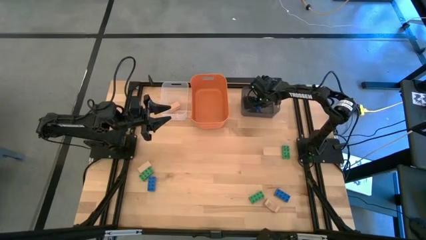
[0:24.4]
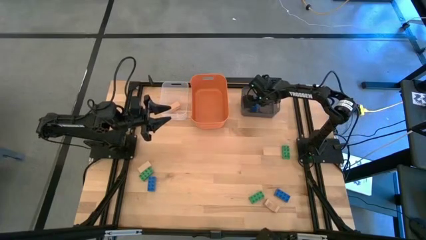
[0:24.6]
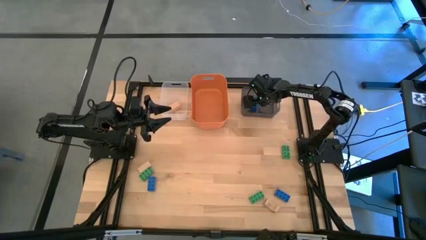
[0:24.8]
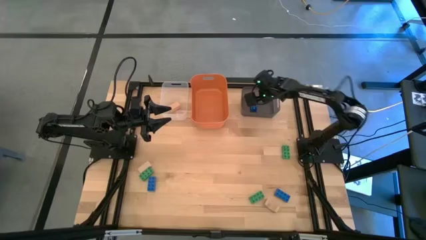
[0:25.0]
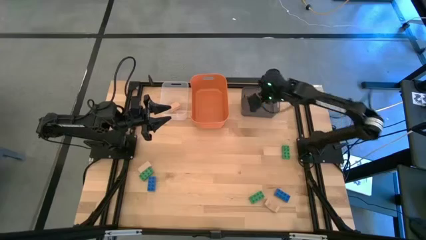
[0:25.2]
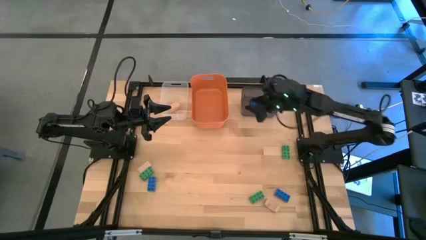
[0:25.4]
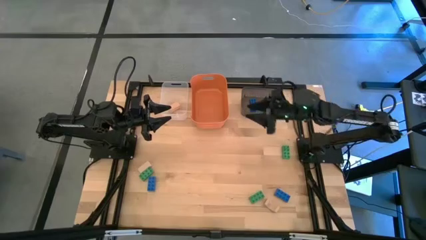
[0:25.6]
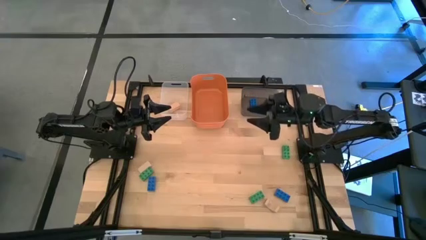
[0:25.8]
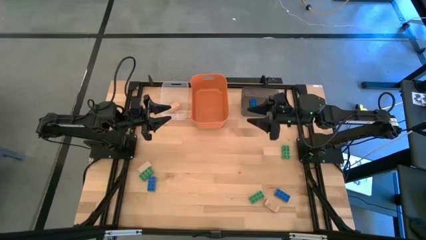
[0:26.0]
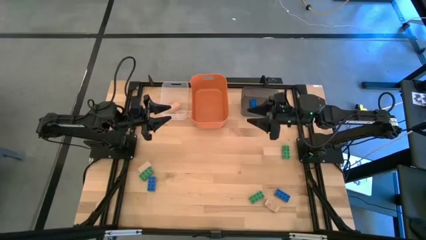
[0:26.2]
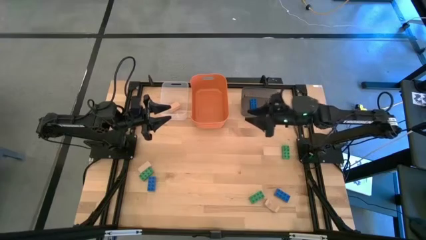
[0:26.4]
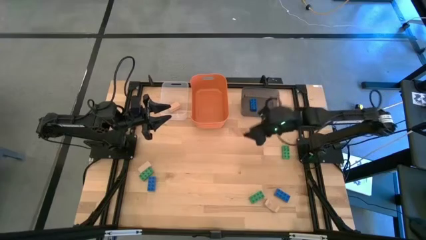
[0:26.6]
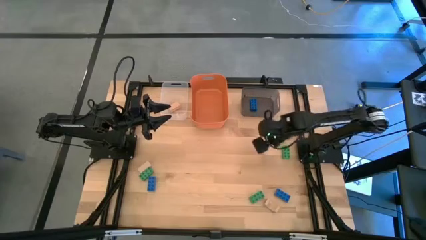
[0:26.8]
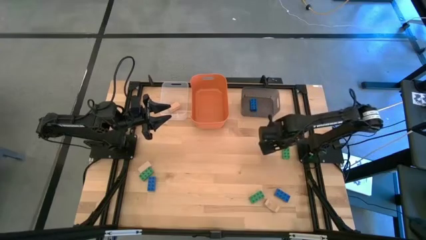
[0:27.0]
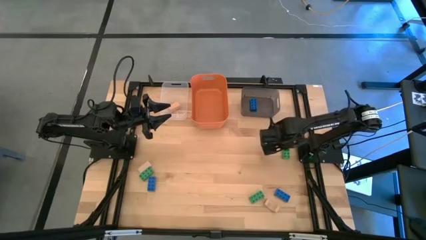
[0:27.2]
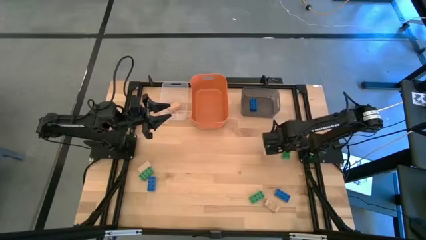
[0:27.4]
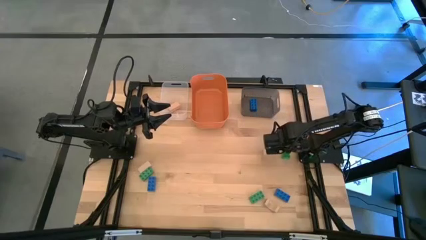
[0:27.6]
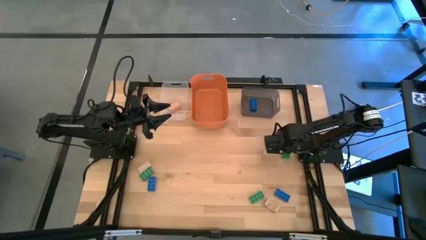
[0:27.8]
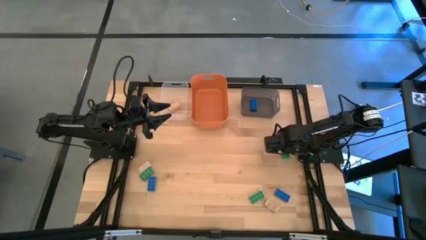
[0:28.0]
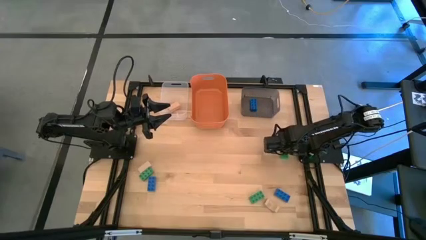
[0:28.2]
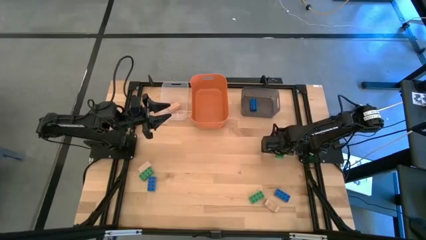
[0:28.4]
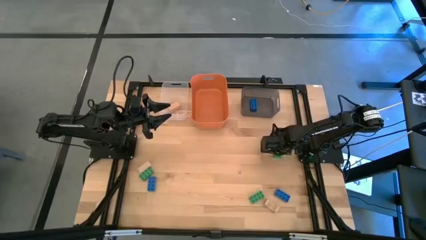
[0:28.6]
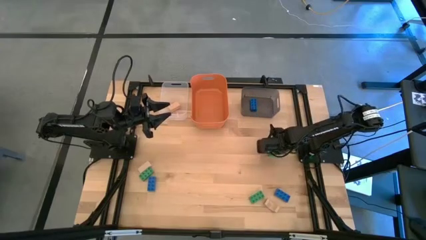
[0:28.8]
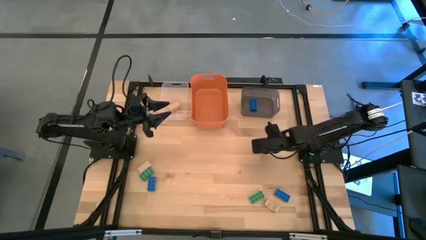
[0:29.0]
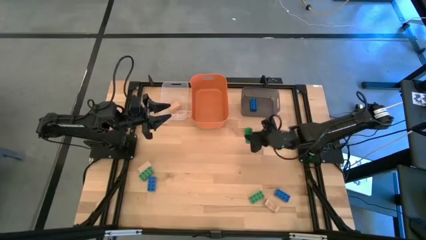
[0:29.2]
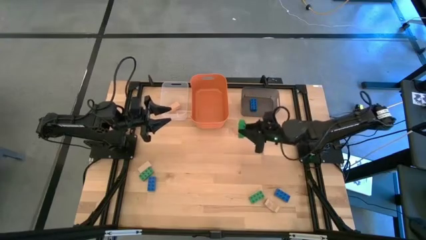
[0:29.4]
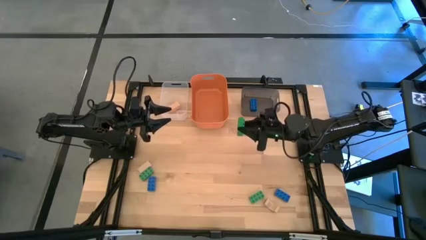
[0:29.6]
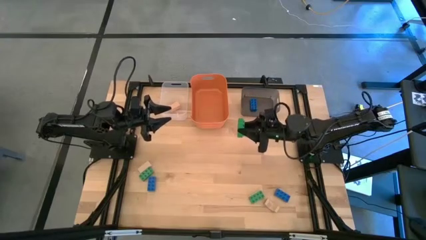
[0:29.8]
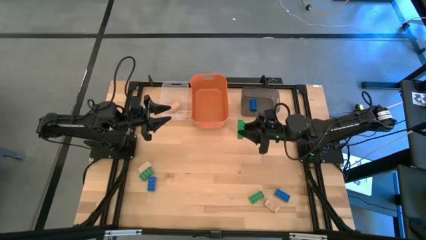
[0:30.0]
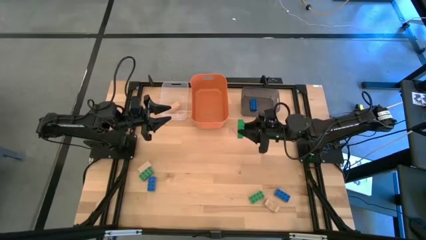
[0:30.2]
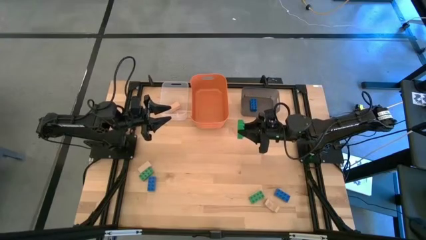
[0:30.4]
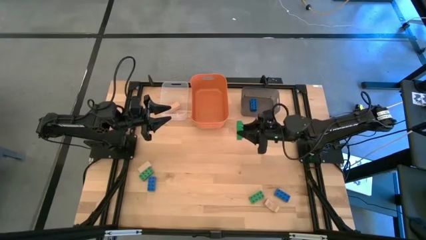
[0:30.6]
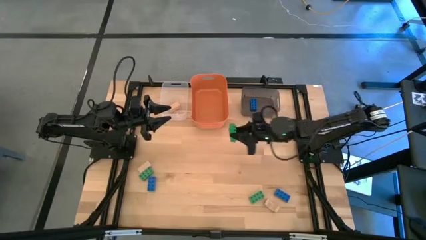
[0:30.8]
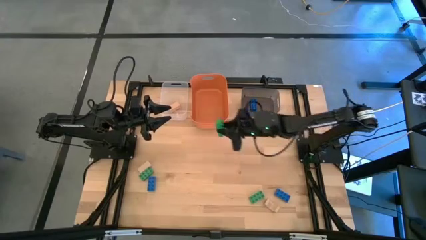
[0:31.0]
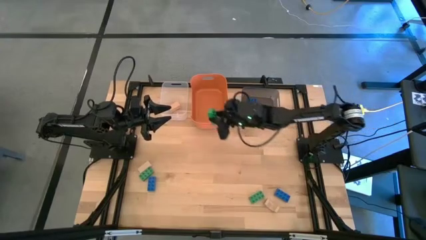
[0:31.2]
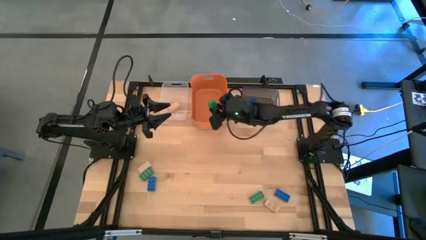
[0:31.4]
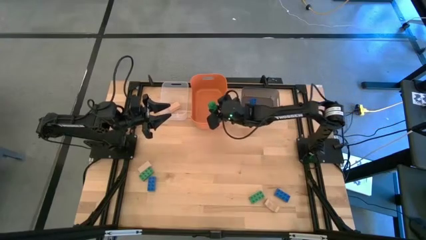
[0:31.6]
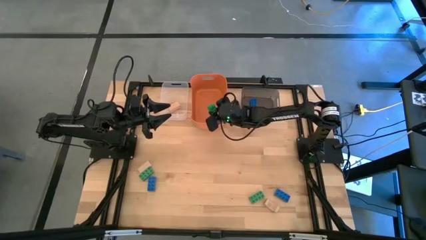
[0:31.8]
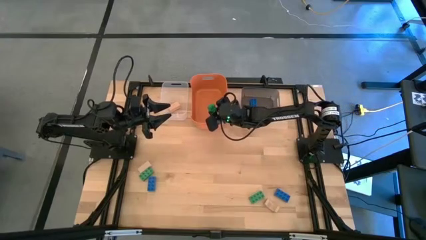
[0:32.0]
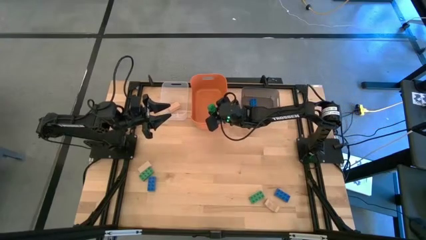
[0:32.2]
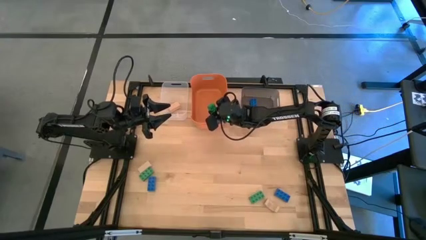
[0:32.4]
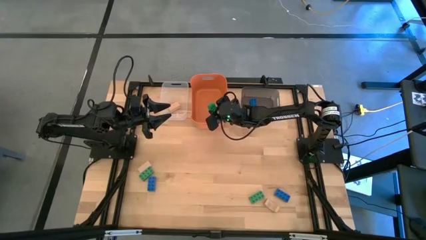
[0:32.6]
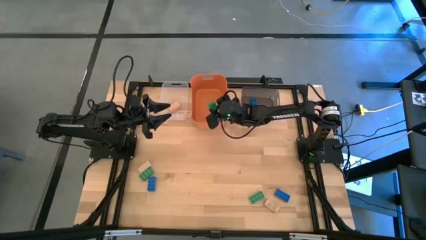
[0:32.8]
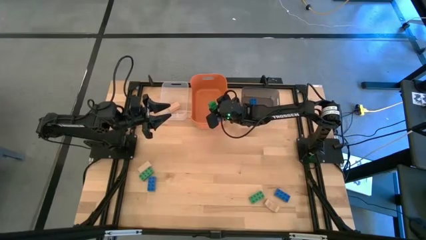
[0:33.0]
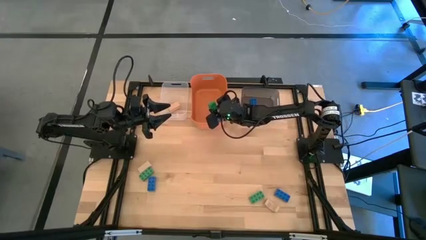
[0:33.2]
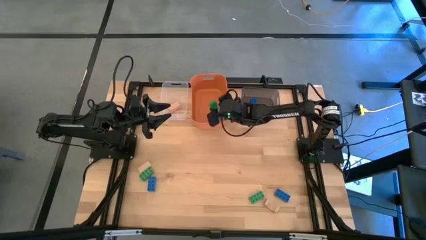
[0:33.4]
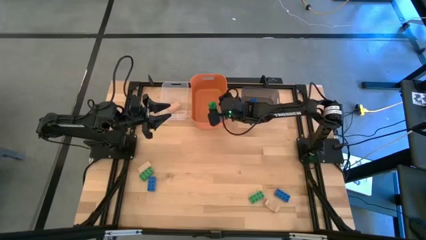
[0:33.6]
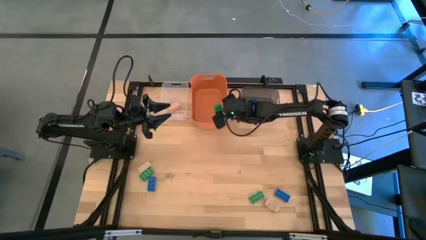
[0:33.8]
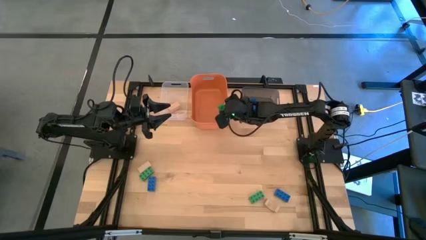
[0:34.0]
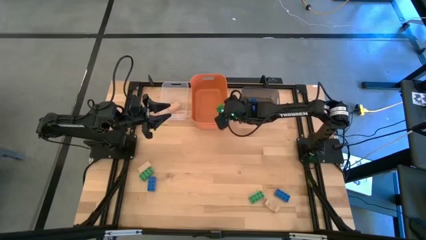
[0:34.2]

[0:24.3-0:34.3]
Task: Sort & place blocks by color
Put the top right green game piece into the orange bin

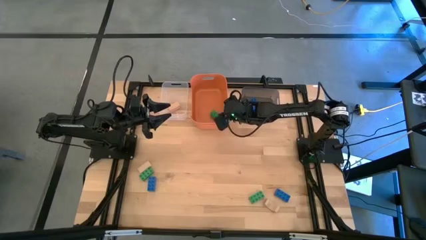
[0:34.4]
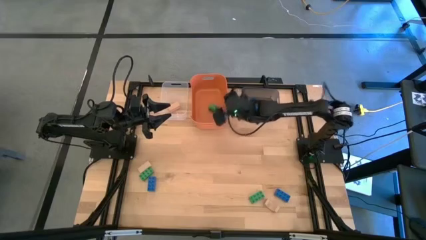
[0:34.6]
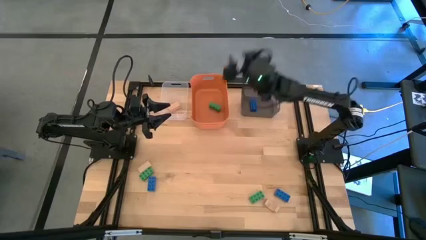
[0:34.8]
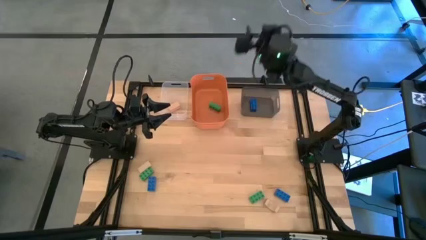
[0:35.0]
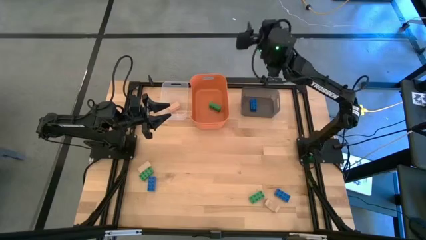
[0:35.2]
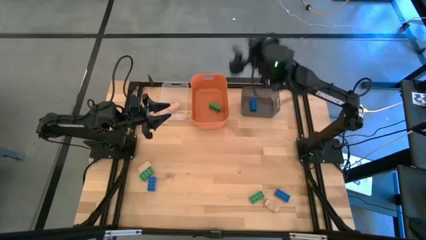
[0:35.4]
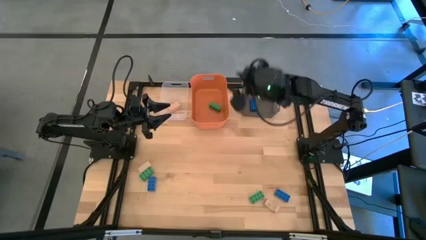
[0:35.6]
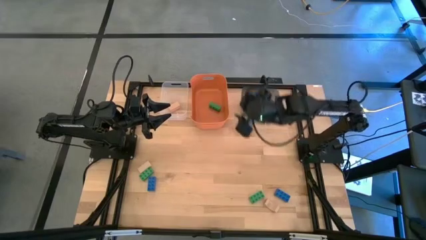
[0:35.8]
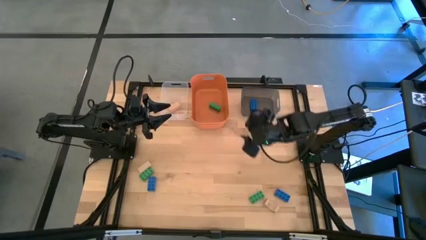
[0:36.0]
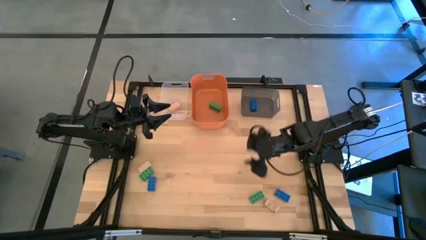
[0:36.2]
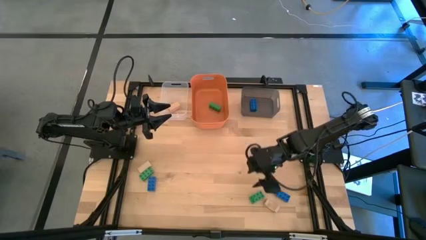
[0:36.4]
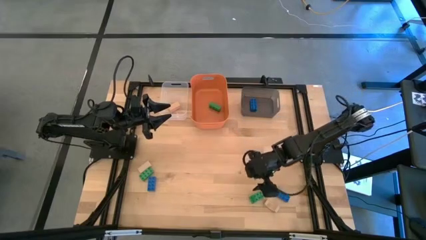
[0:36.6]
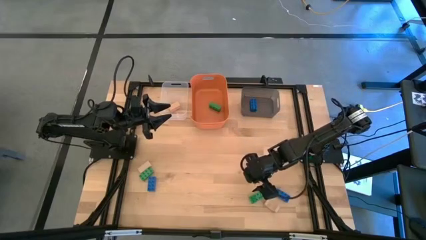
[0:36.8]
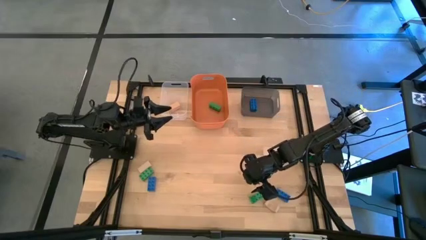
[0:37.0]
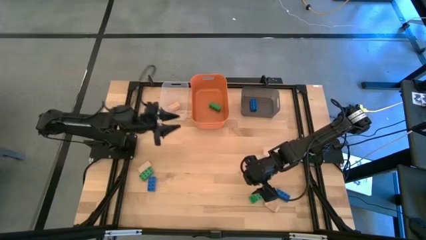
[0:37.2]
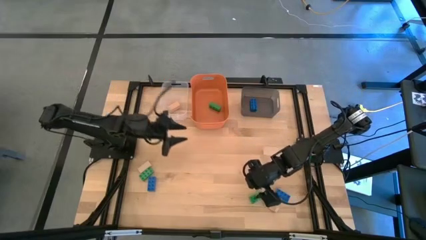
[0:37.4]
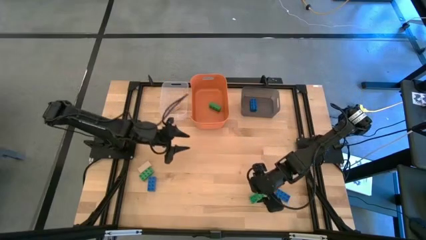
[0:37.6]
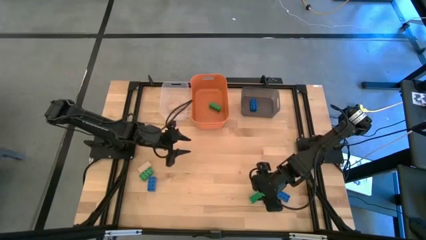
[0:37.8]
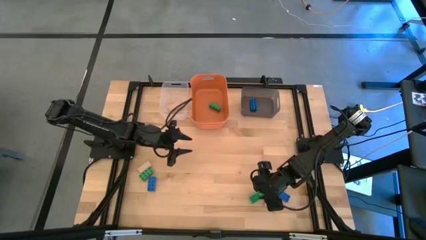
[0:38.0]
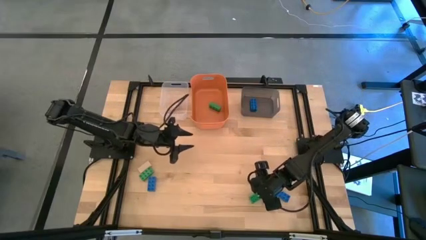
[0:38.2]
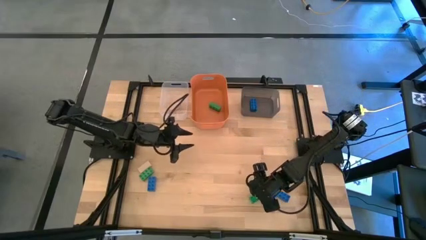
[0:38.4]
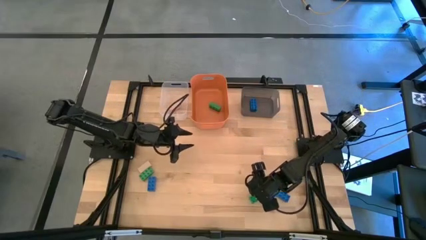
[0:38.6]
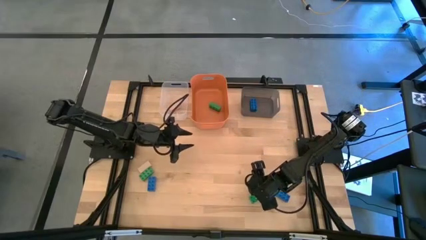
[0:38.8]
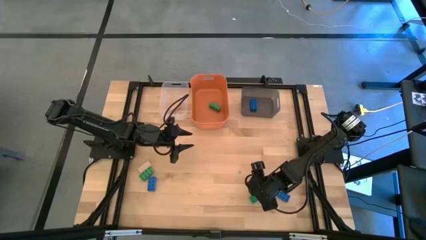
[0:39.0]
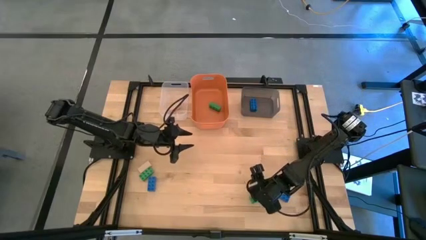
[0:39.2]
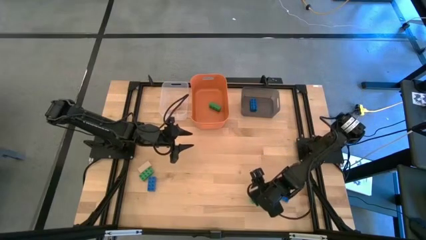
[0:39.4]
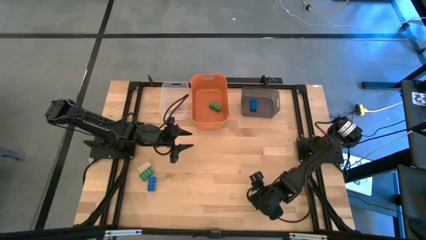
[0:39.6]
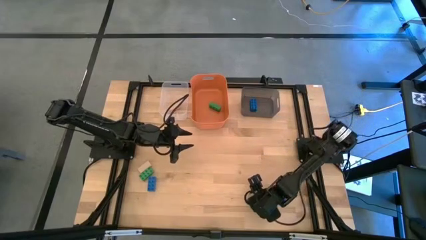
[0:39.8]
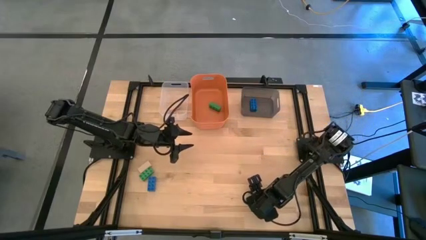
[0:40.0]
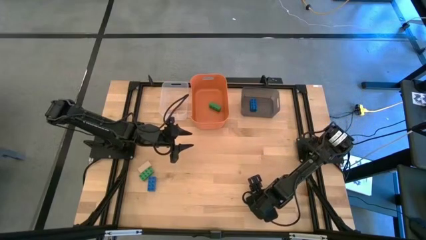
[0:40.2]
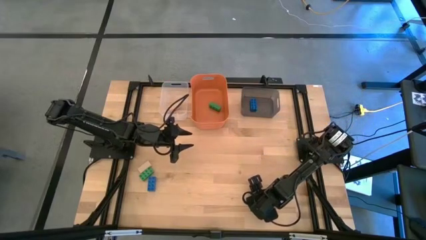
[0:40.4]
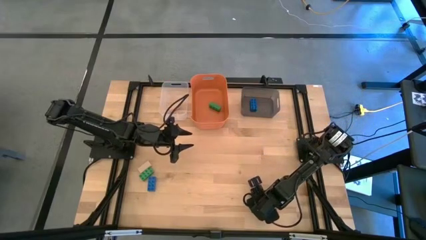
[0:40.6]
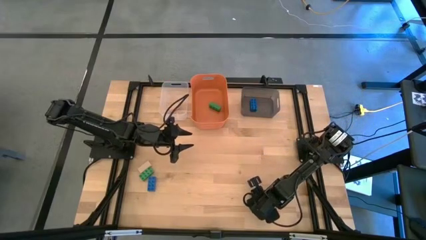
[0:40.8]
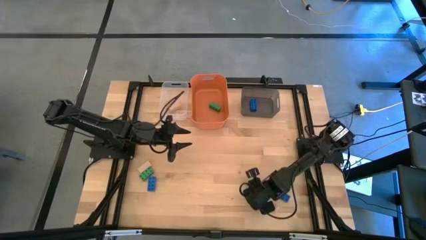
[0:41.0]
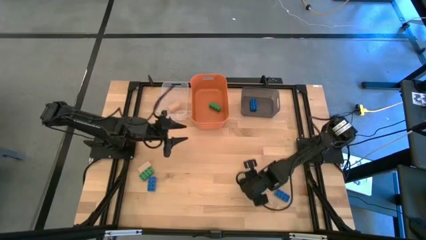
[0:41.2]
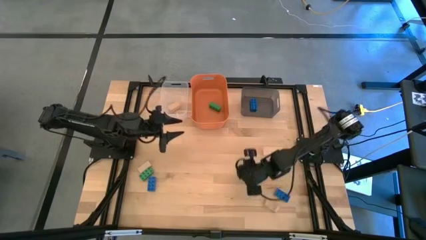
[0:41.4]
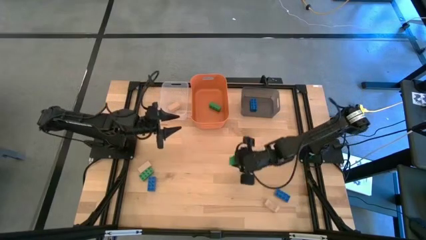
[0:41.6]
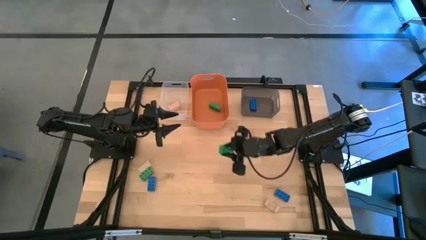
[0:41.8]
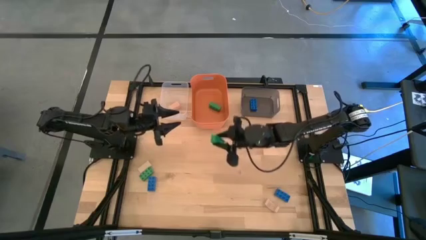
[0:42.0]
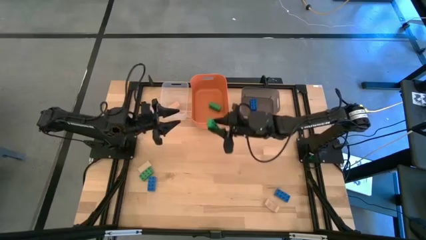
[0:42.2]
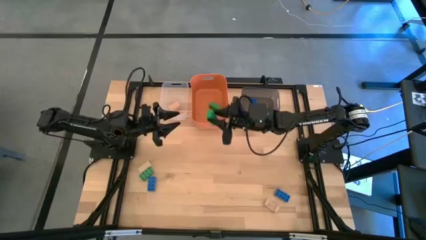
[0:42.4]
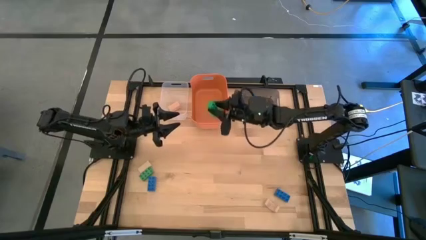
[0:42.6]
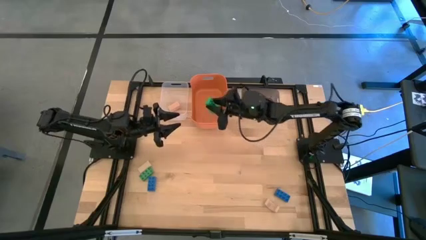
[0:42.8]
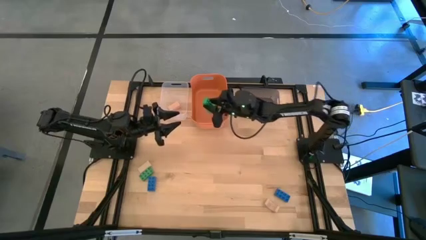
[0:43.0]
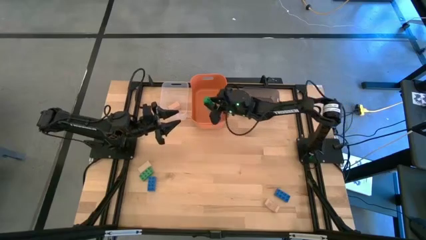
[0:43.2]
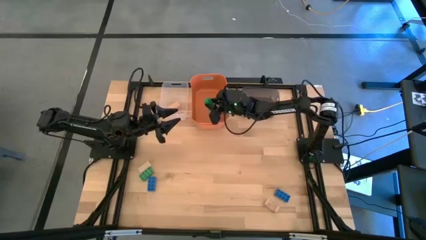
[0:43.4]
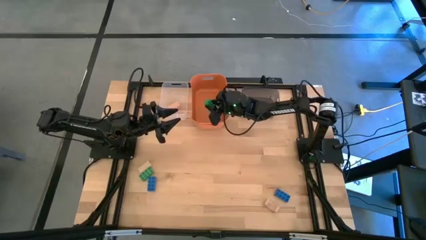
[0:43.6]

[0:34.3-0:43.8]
Put the right green game piece into the orange bin
